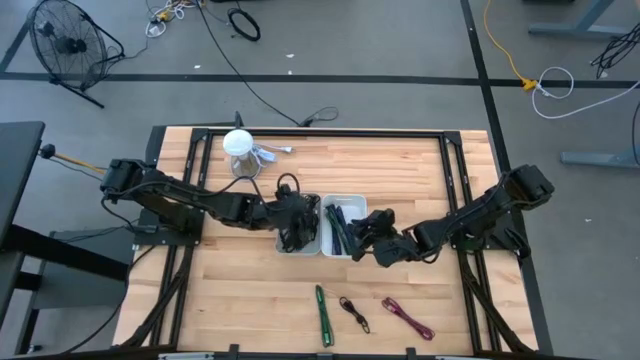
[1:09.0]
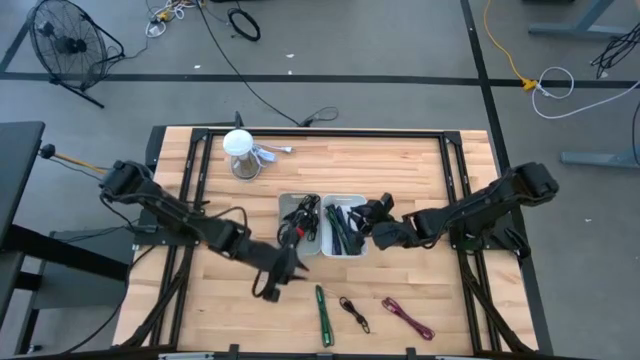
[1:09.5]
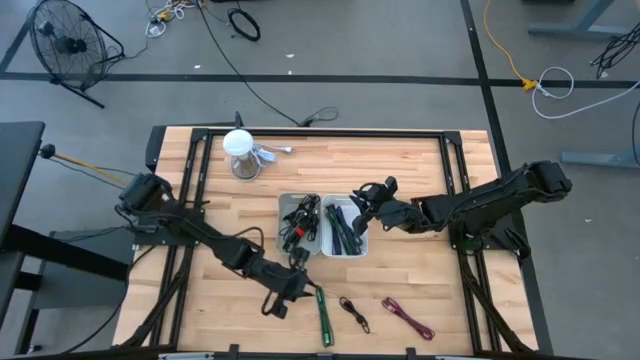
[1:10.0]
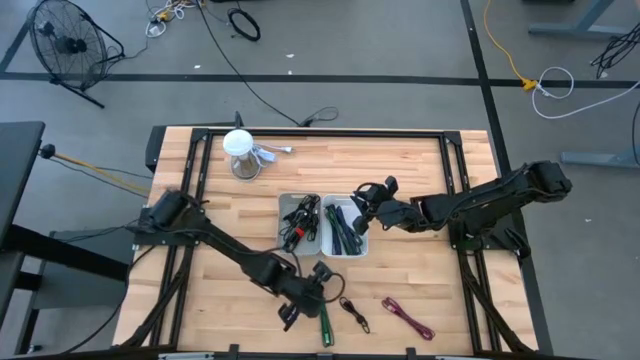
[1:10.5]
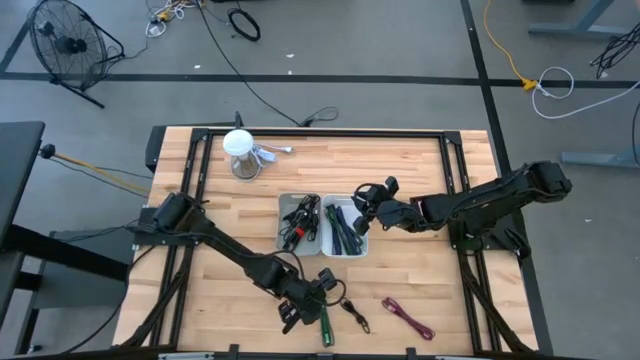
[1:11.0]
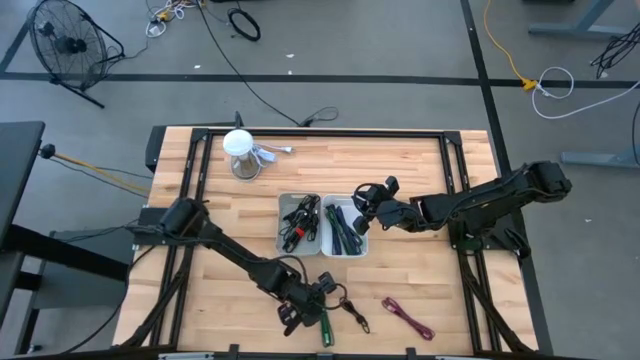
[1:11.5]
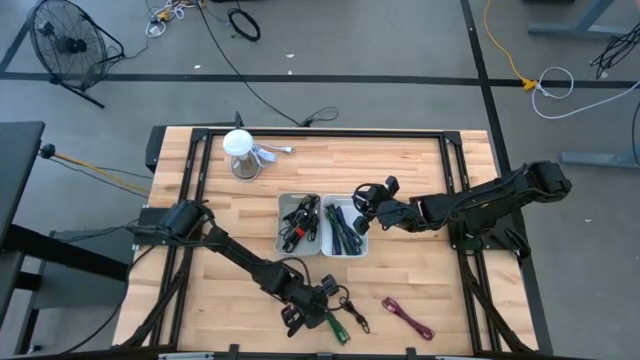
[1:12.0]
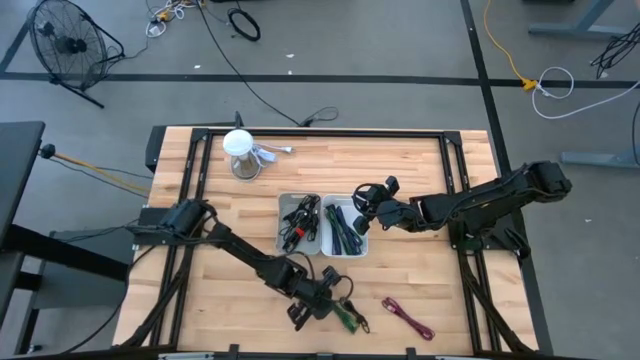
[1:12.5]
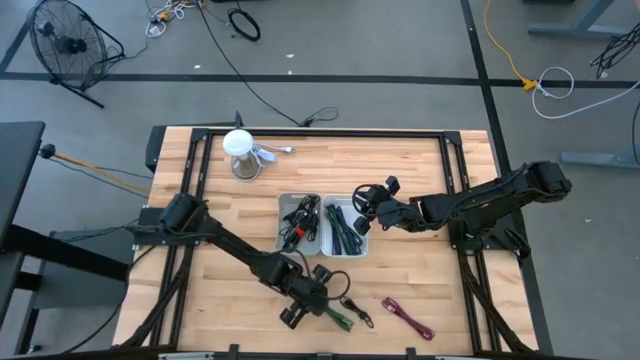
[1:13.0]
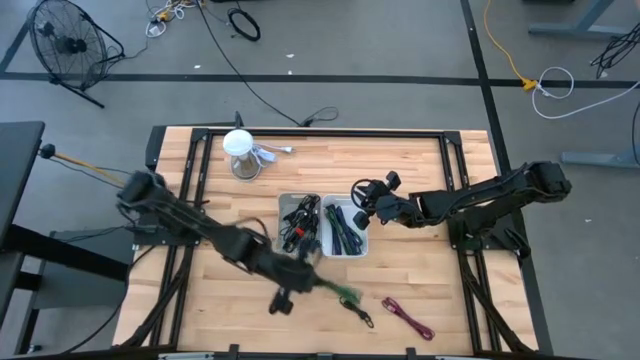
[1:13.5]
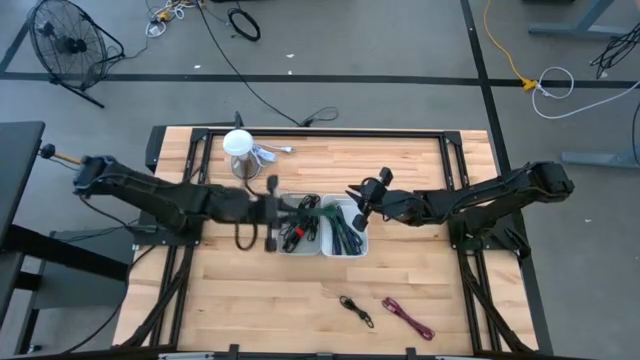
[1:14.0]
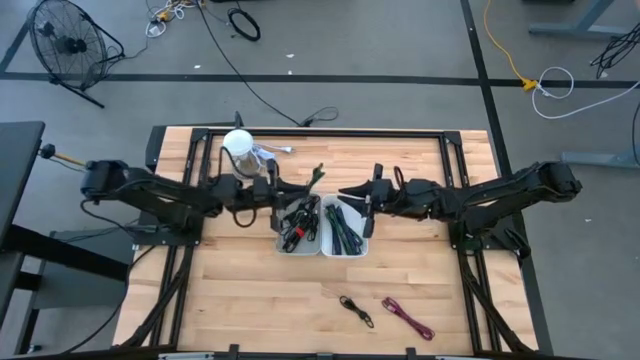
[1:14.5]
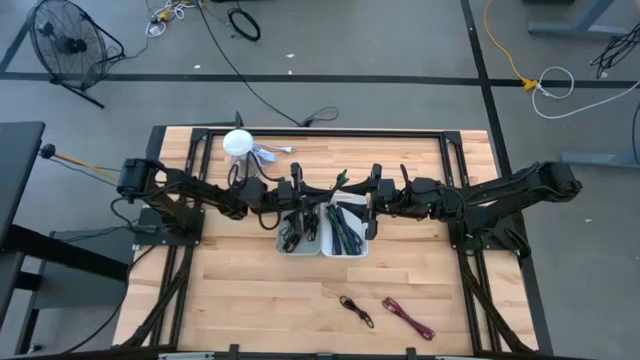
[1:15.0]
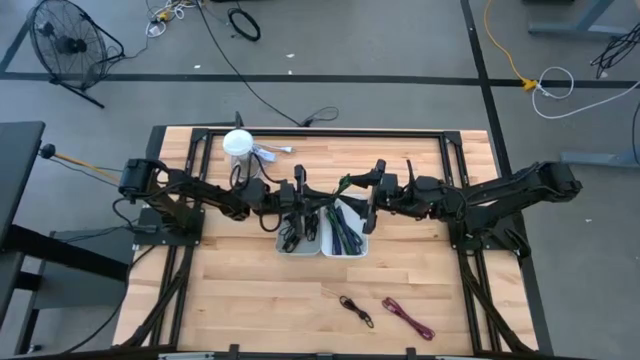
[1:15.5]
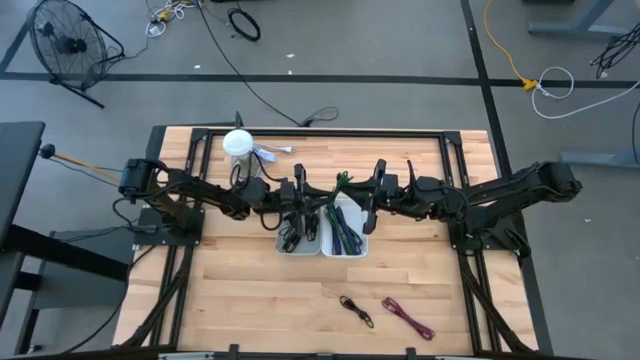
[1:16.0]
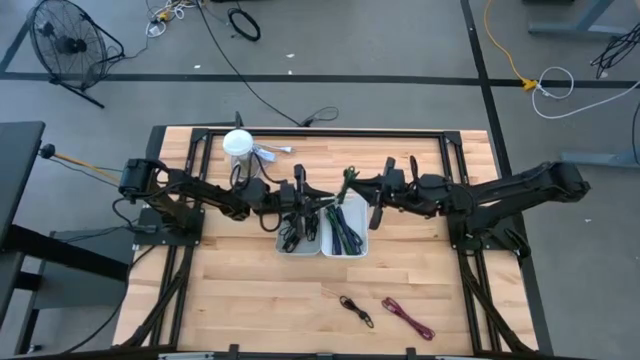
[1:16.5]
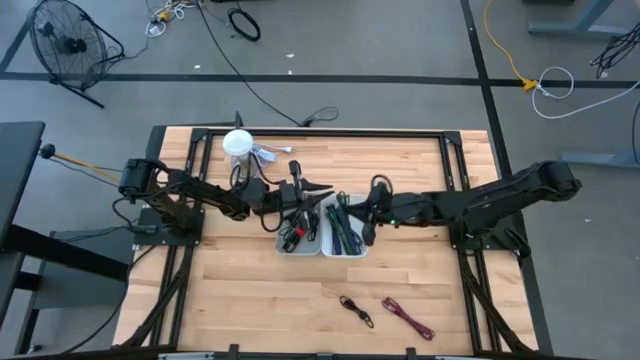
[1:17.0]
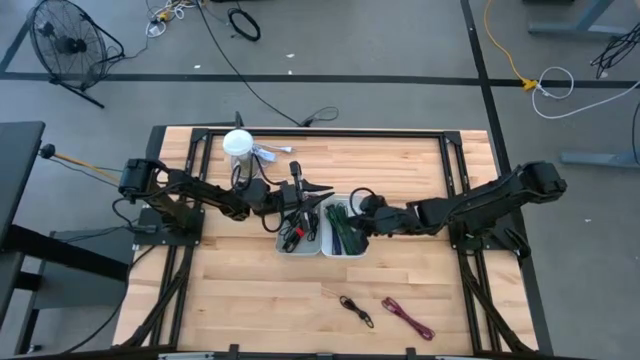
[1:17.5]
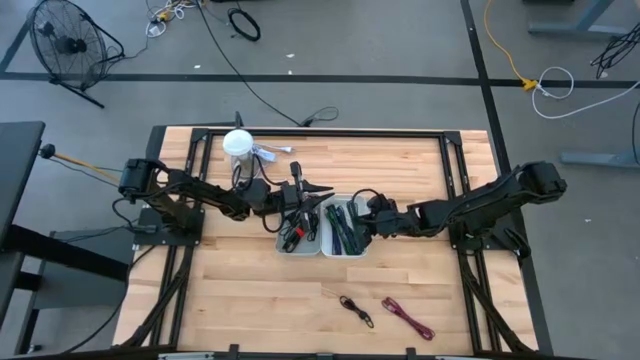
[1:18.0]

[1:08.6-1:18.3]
Task: Pick & Place USB Port
Put the green charger cable into the white bin

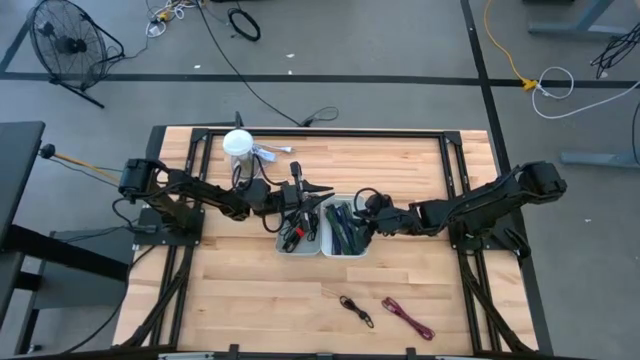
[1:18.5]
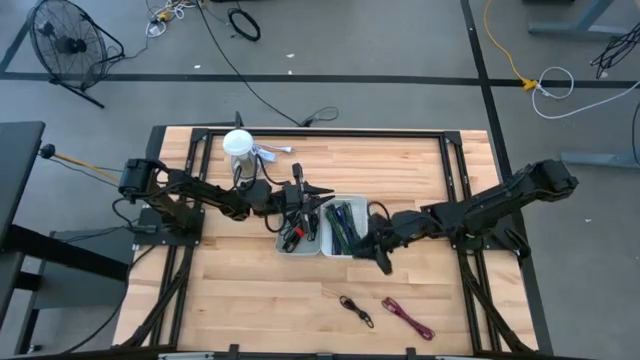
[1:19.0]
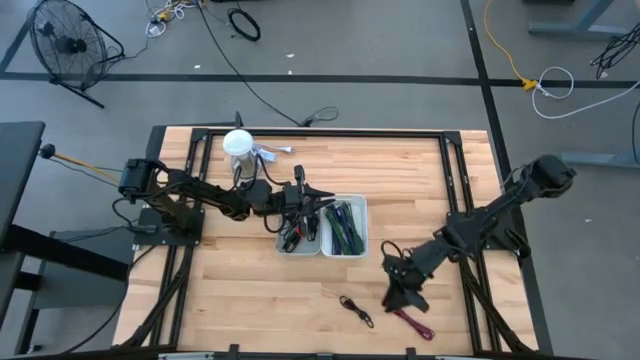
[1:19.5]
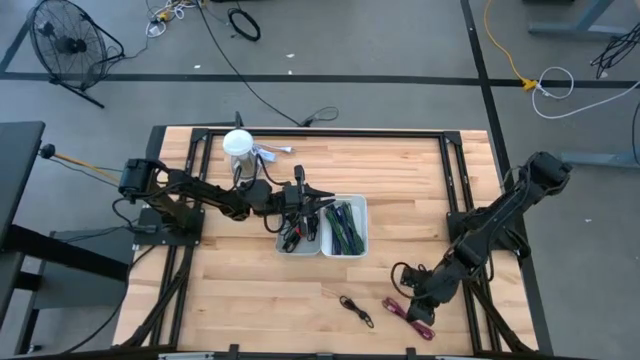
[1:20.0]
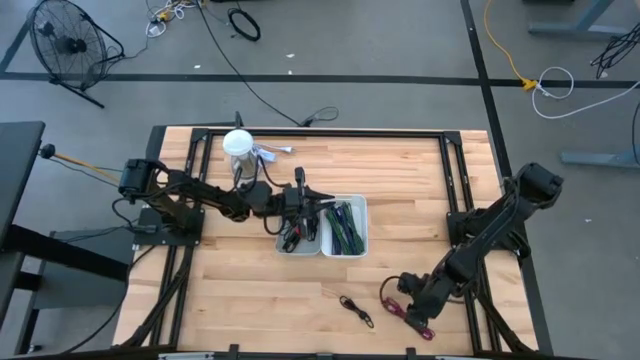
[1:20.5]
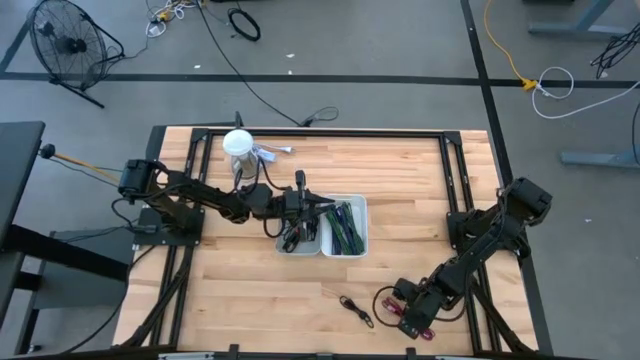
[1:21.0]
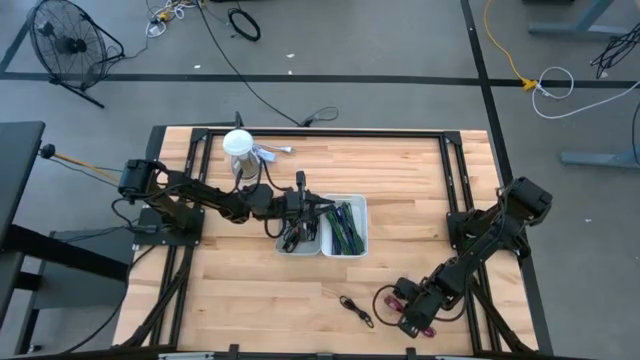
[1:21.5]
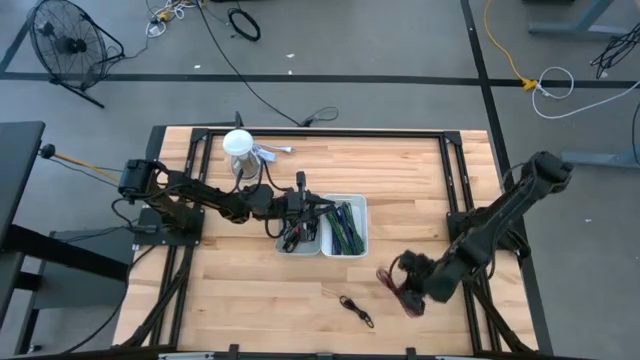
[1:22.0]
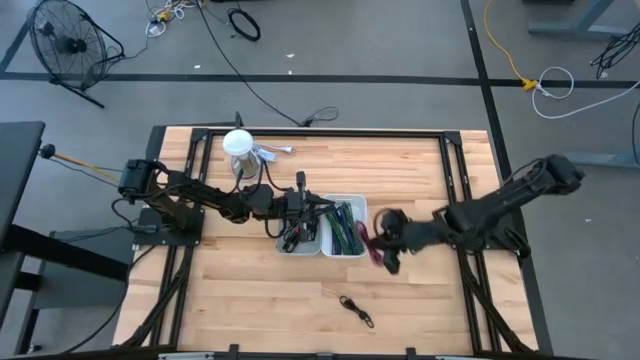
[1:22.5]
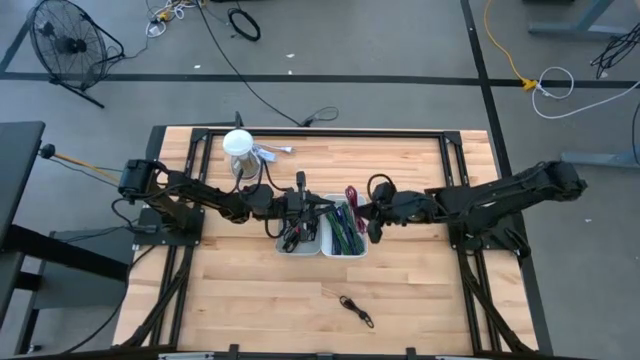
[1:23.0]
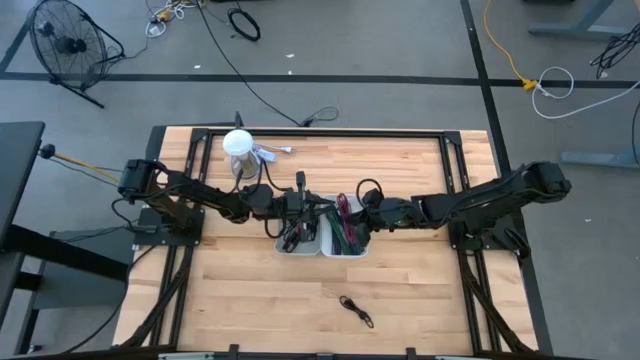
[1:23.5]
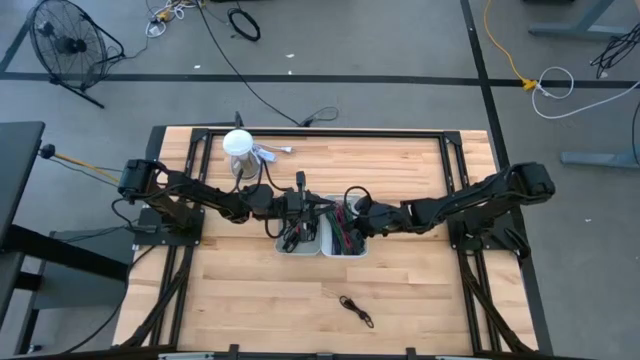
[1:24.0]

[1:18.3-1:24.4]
Put the pink charger cable into the white bin

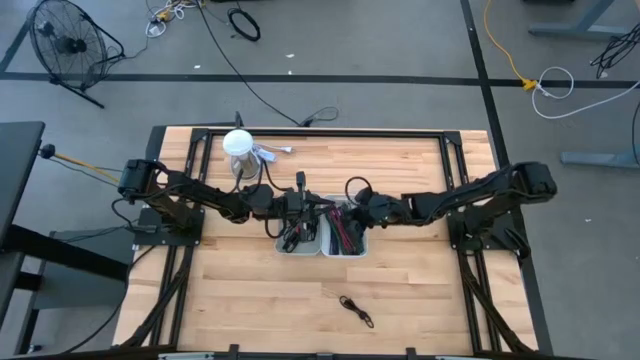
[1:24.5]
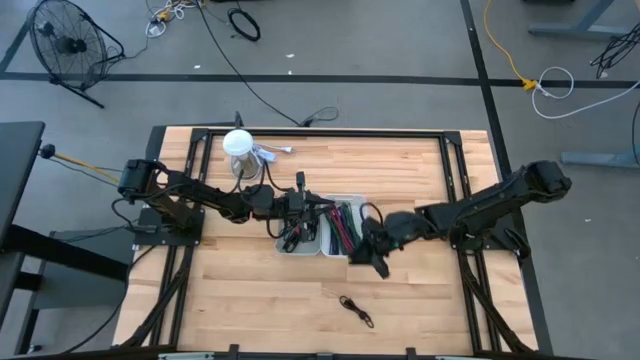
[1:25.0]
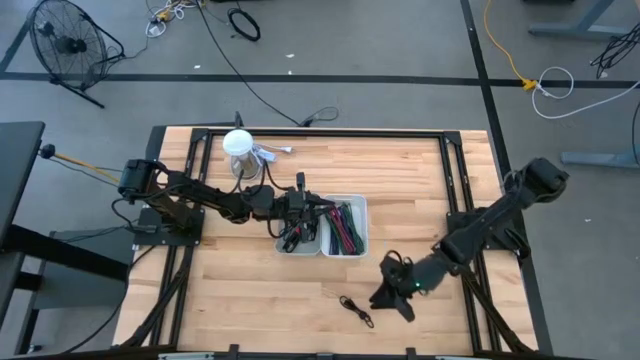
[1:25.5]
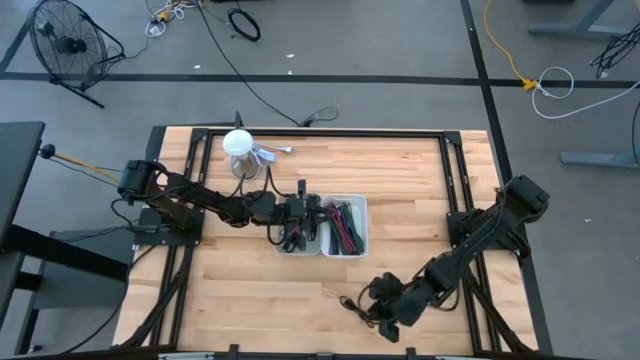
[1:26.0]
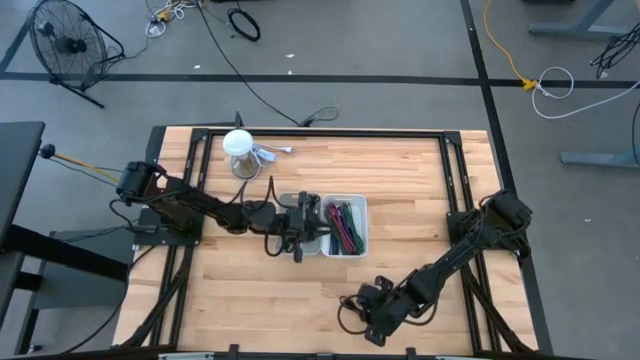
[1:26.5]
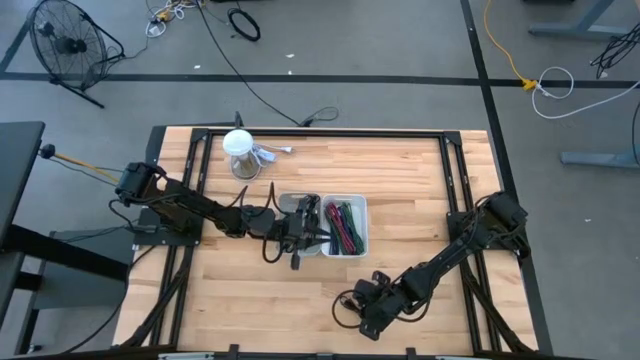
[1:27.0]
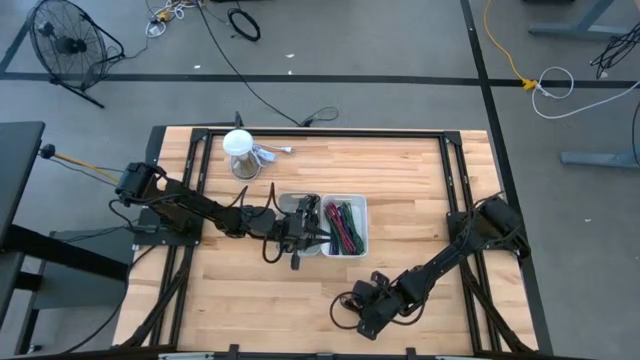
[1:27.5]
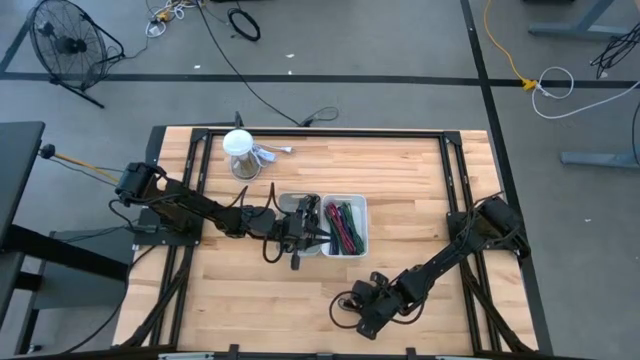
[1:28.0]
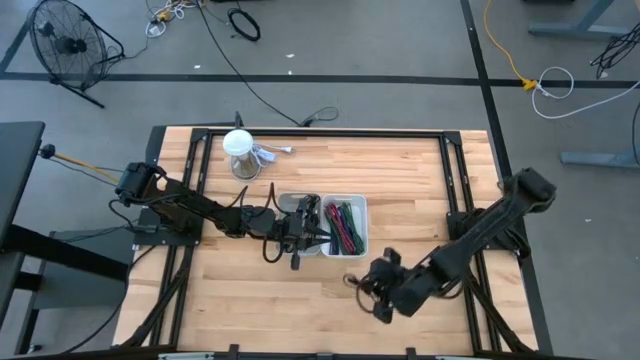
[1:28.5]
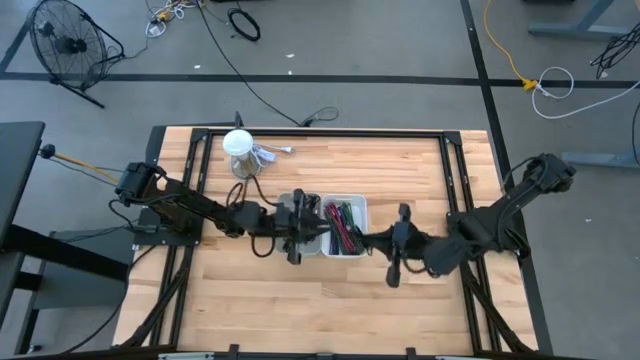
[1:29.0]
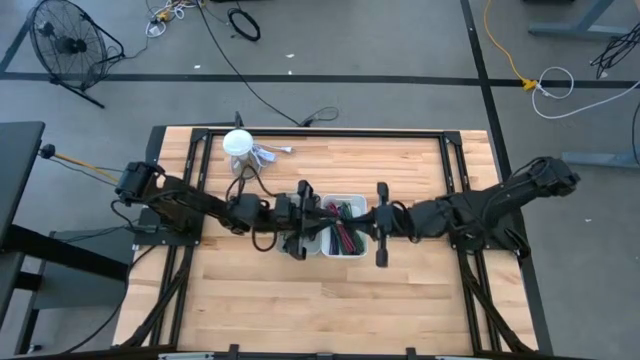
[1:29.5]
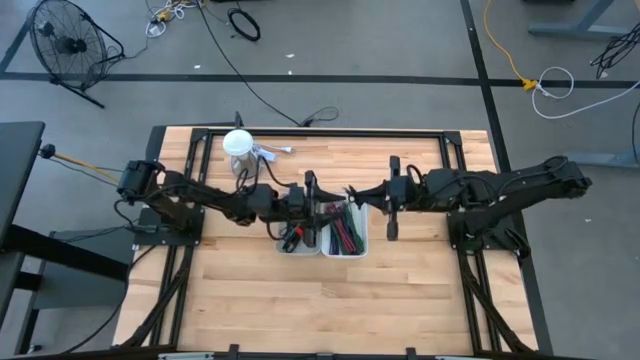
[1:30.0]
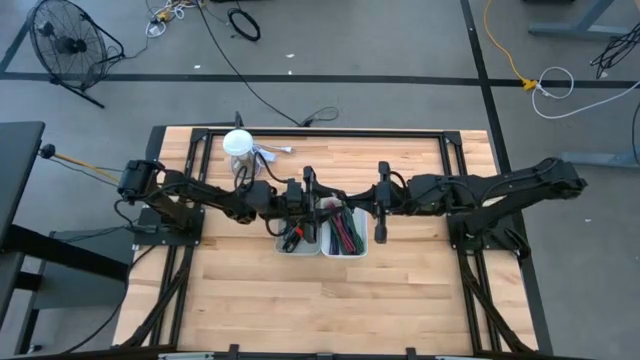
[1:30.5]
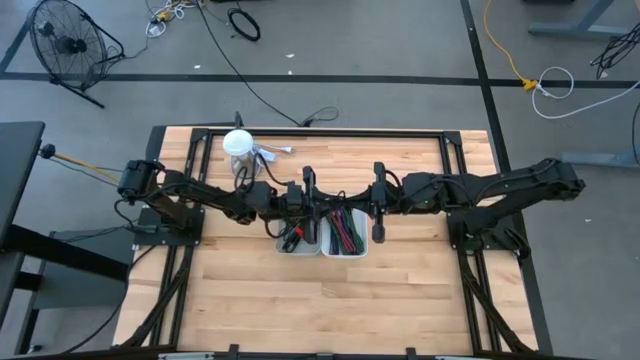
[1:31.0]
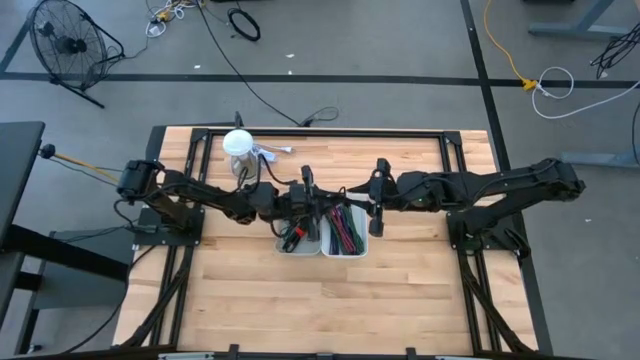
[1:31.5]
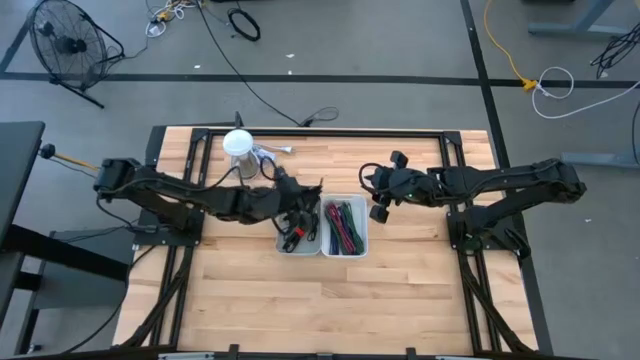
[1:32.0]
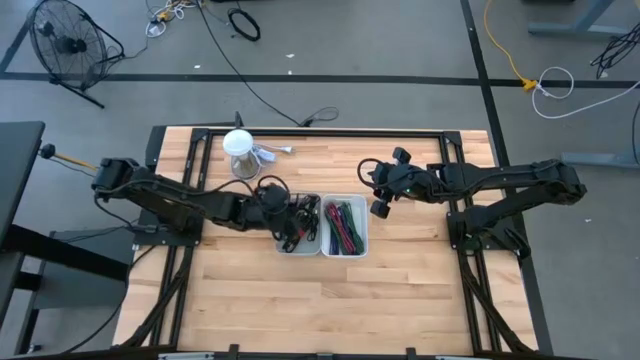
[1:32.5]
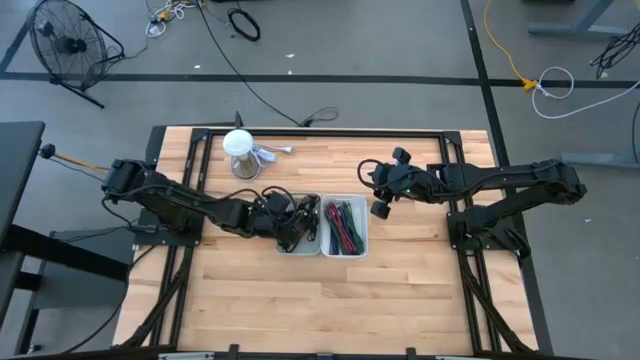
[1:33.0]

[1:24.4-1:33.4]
Put the black charger cable into the gray bin
